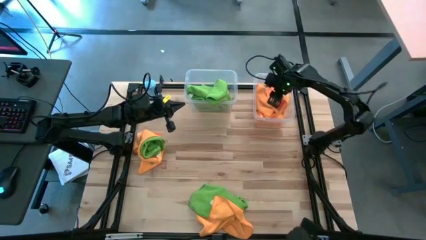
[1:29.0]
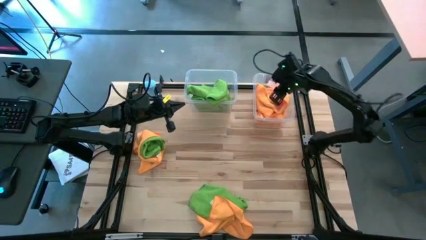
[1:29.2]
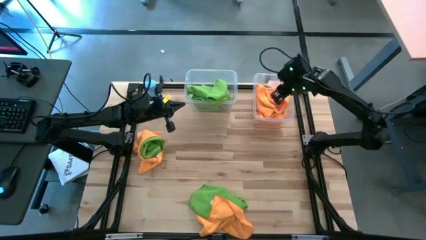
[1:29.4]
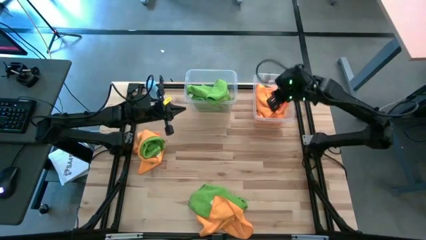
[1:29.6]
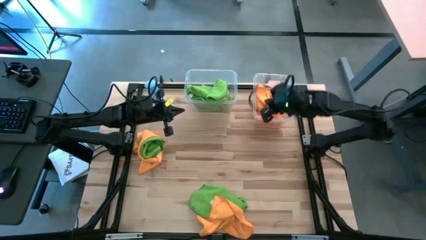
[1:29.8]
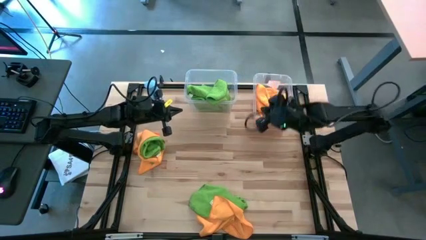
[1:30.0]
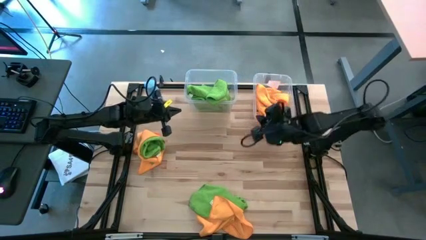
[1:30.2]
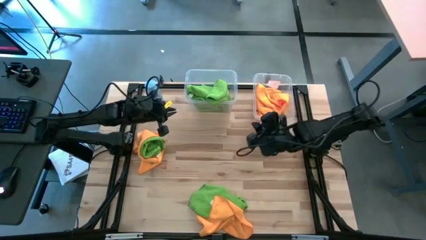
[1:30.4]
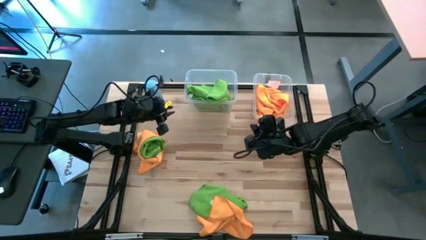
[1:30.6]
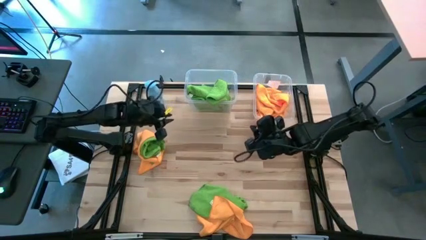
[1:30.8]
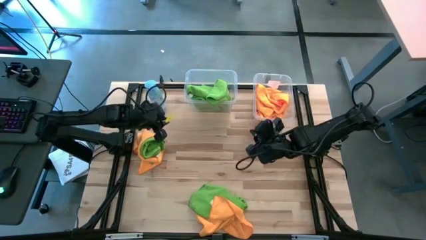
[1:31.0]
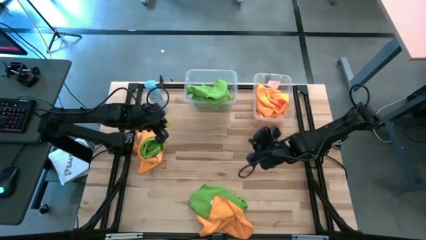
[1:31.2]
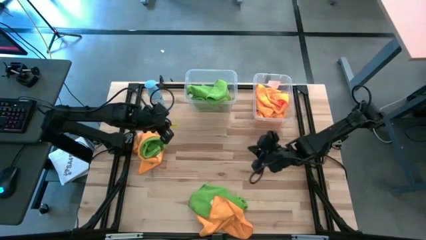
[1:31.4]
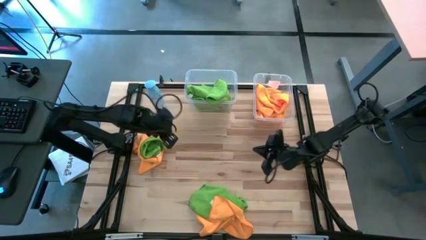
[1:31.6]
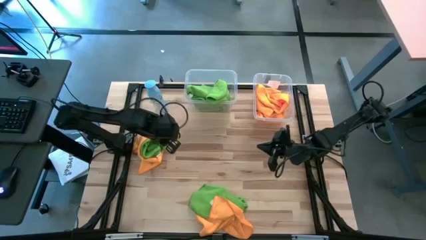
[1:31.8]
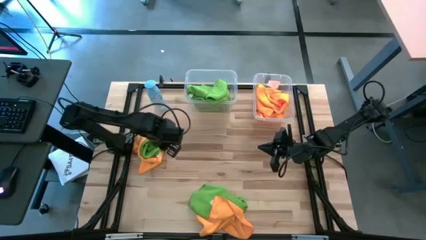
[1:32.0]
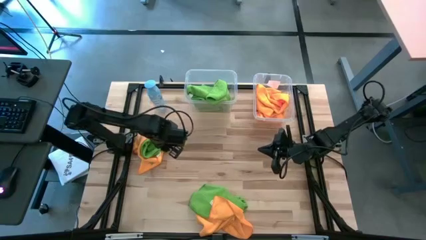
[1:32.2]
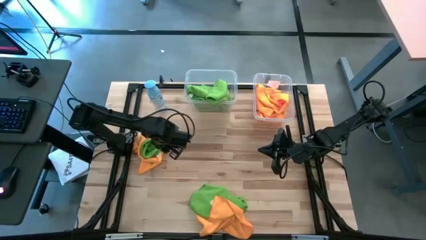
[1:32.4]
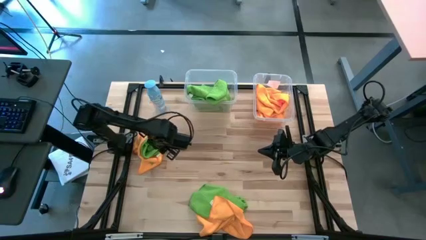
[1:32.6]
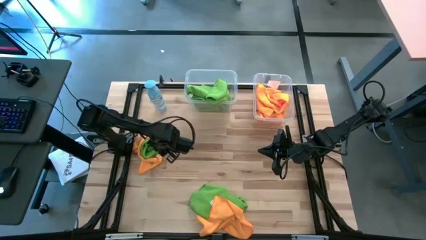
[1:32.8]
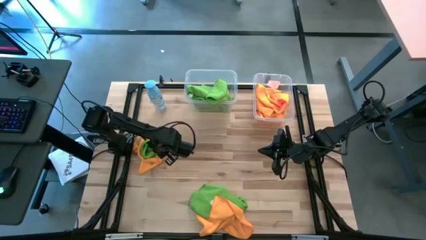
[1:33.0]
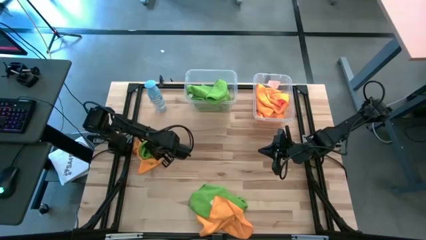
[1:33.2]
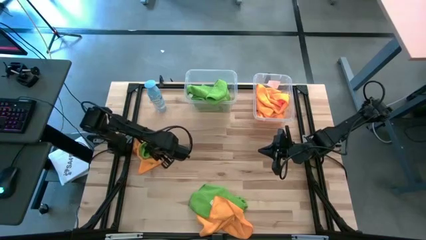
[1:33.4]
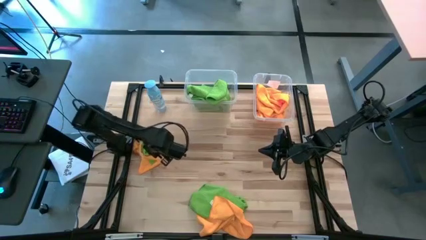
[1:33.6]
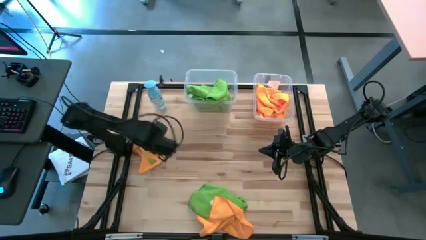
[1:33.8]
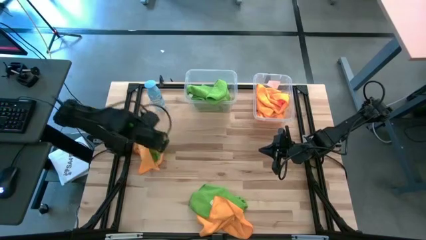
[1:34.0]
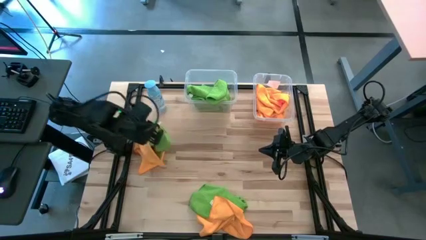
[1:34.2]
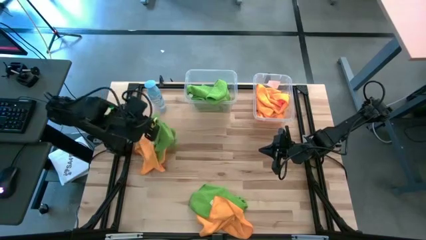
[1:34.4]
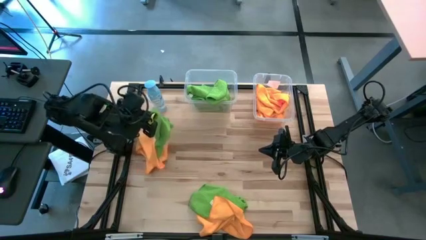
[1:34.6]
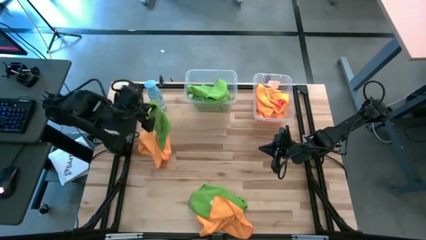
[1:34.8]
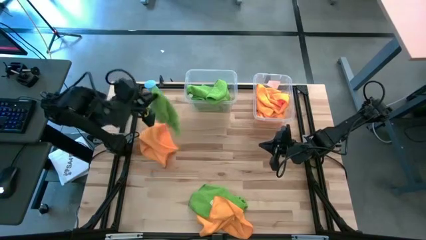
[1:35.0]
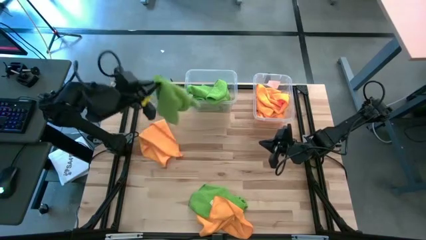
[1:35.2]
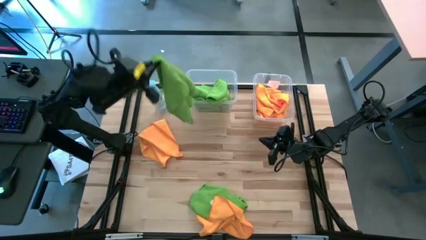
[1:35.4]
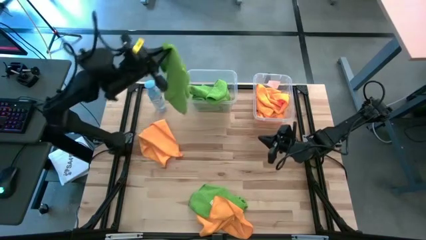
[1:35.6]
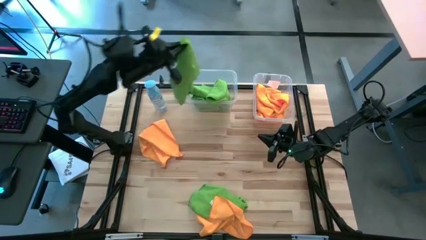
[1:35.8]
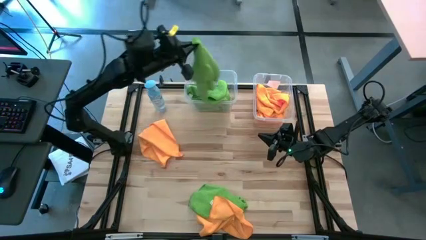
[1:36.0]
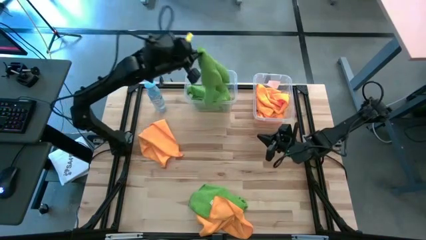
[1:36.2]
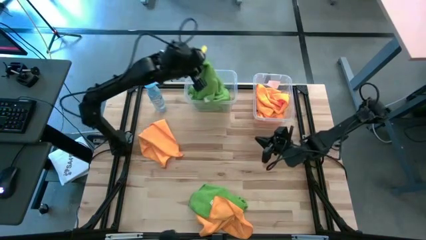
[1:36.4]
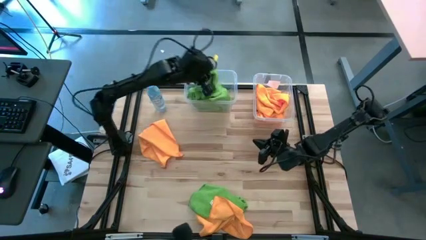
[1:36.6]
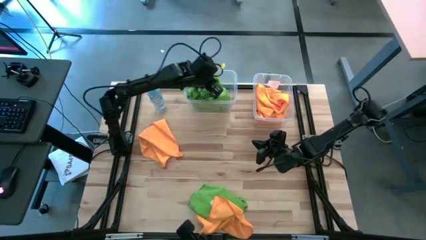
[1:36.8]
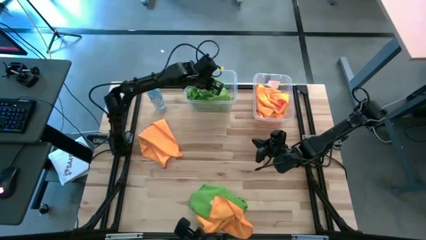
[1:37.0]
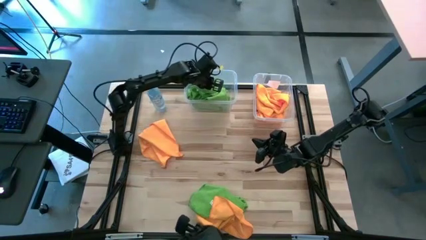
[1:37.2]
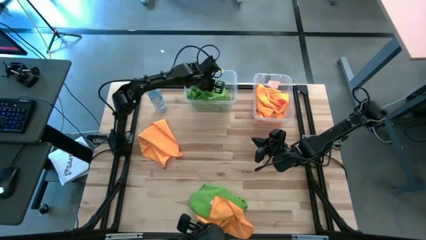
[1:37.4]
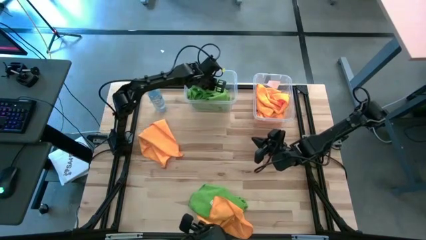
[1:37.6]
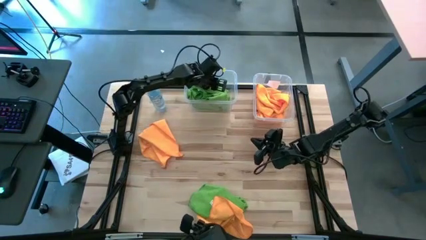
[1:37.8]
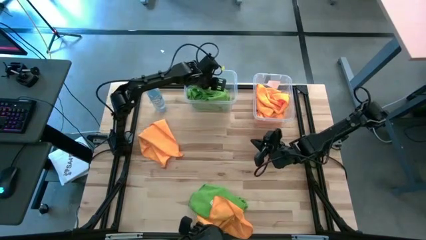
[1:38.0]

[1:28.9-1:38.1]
Task: Sort microfiber towel by color & place in baskets
Put the green towel into the left transparent bin

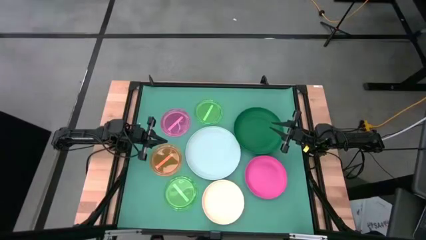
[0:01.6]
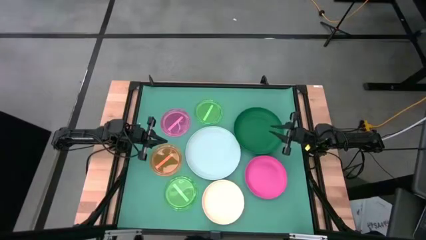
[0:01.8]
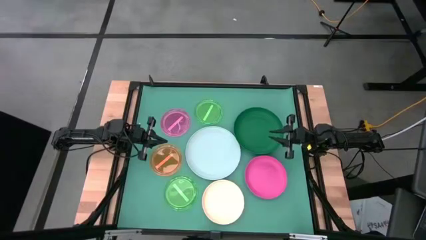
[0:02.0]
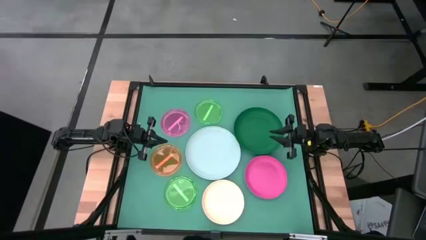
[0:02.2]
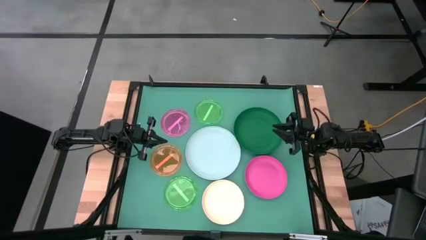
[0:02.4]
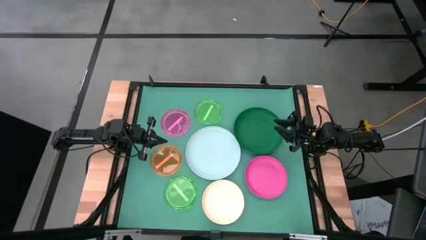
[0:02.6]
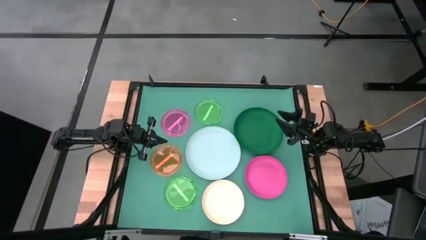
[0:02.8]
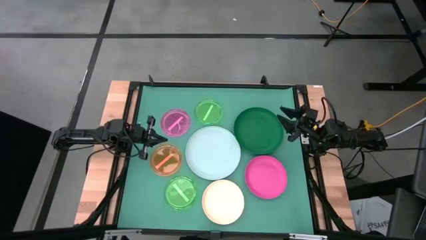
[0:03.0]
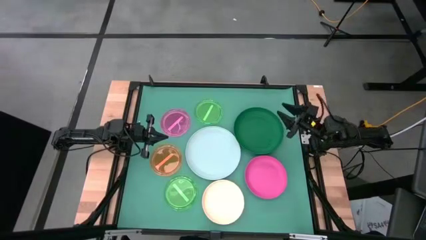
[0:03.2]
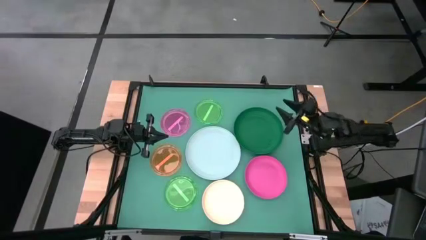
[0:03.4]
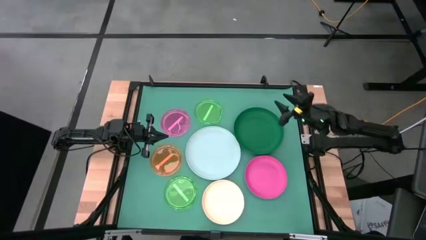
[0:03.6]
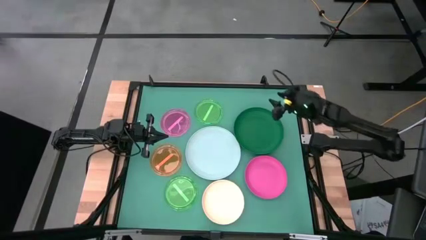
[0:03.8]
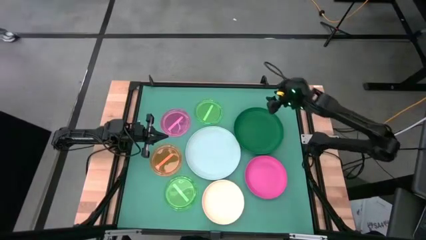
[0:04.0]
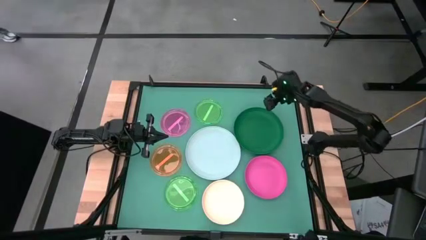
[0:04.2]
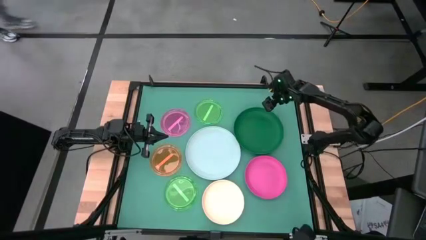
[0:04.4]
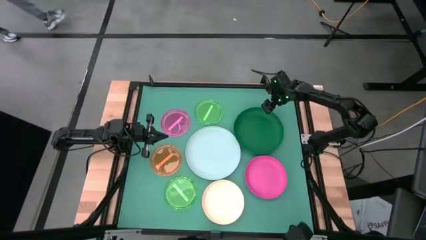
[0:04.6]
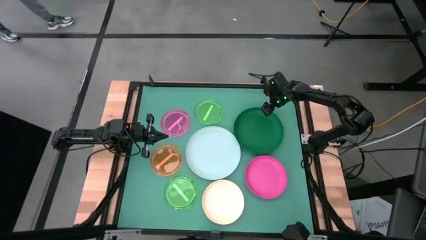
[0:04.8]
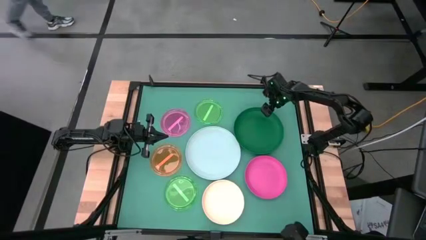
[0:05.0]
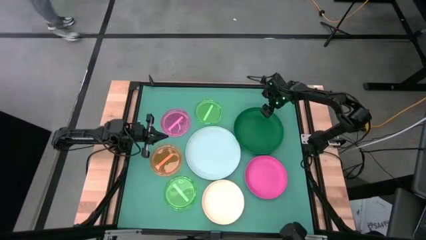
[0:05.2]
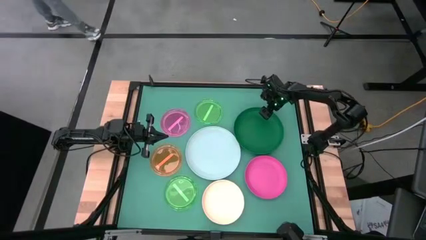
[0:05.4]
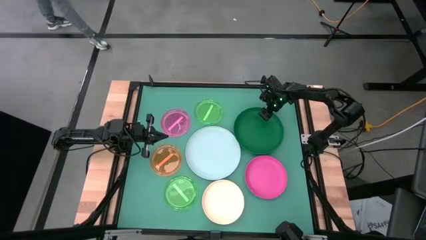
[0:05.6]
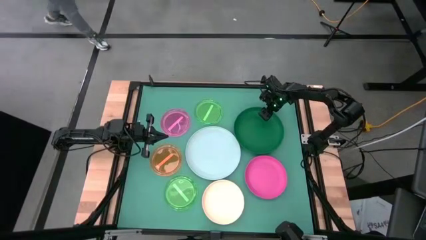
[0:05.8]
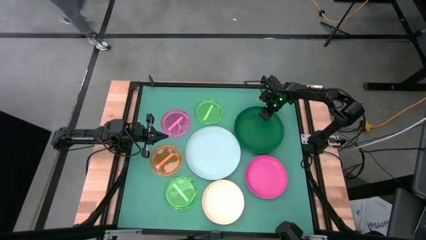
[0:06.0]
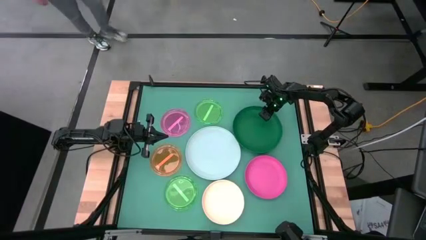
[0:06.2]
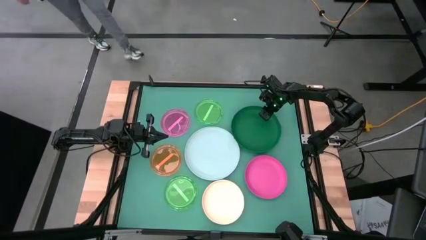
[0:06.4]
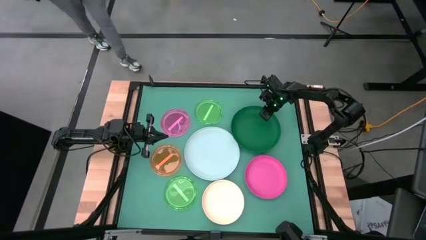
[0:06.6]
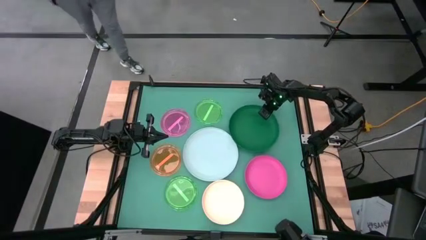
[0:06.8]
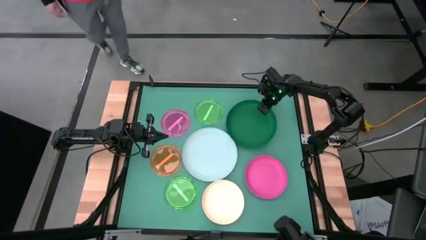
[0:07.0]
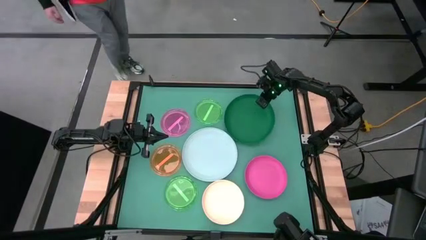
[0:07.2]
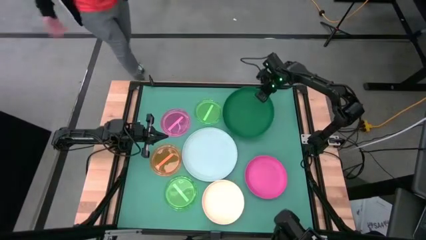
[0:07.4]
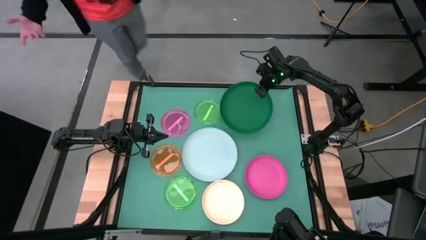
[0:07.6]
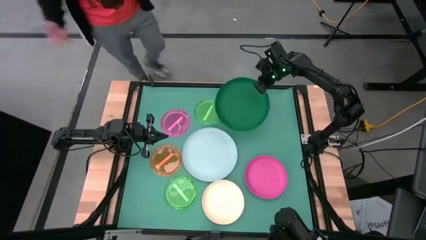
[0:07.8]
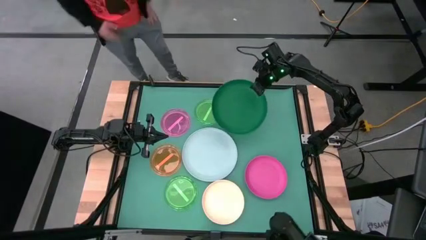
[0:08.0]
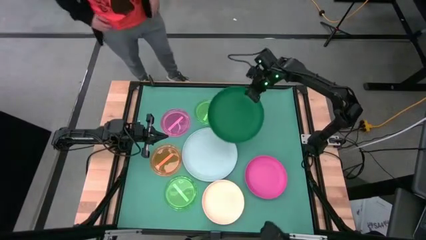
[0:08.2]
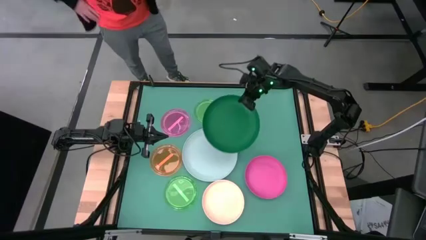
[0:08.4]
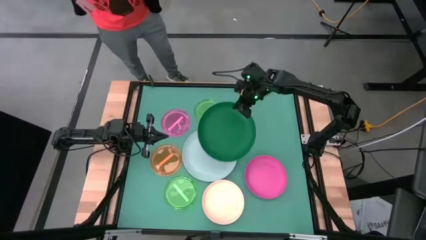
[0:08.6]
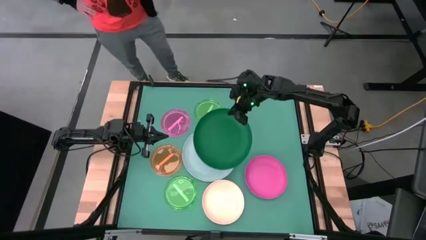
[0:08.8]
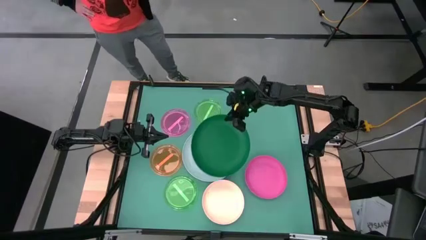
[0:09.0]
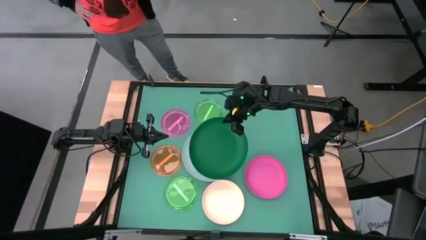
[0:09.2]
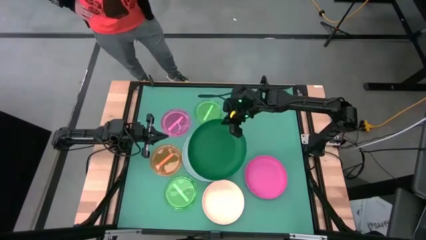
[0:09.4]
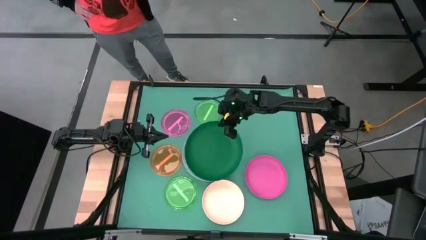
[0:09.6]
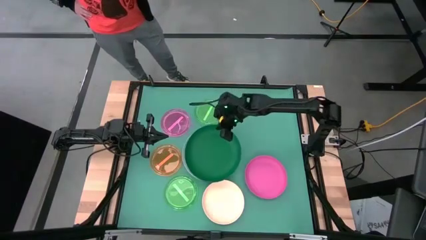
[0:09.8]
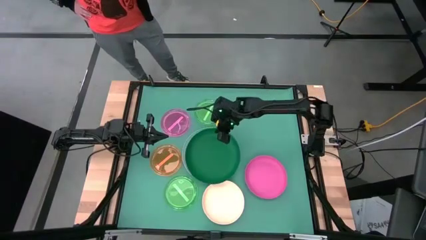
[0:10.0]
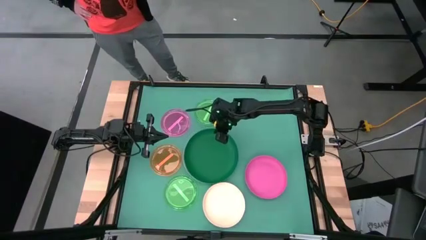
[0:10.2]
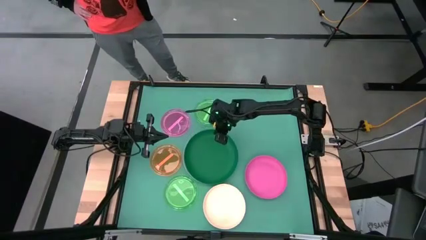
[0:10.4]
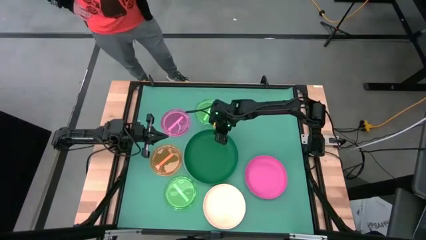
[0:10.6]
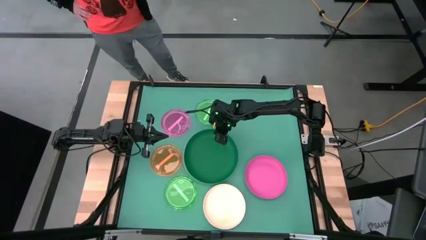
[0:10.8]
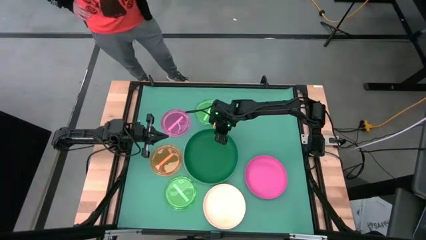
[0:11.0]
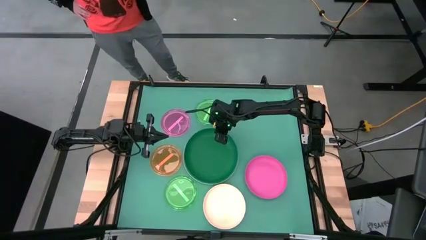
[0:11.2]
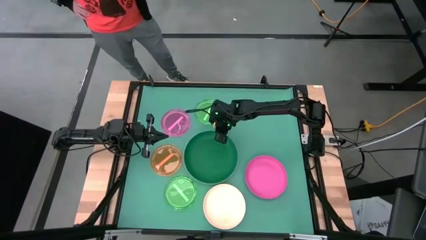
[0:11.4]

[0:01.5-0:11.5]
Task: Stack plastic plates
Stack the green plate on top of the white plate
